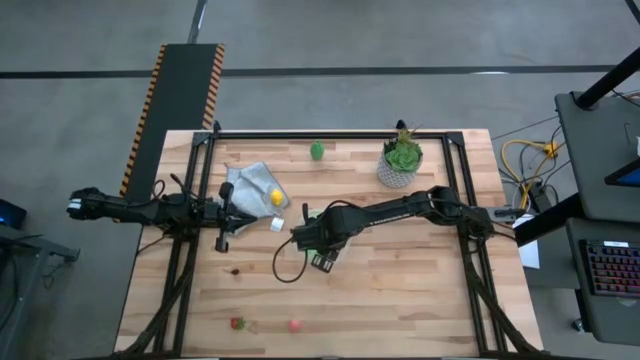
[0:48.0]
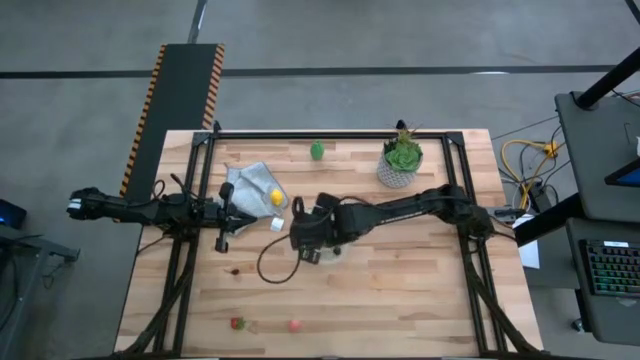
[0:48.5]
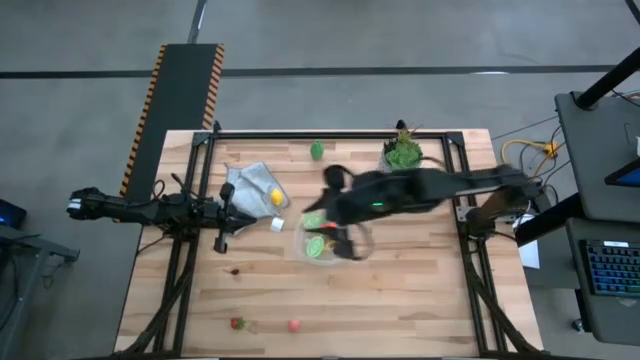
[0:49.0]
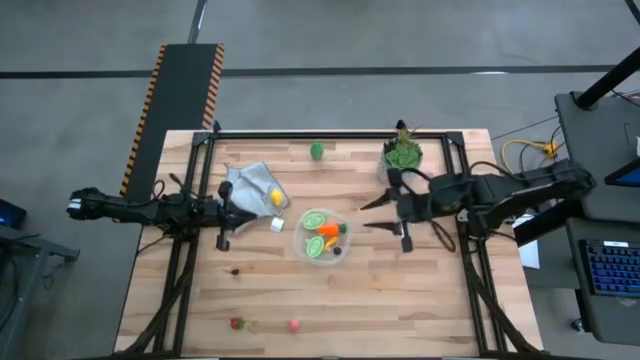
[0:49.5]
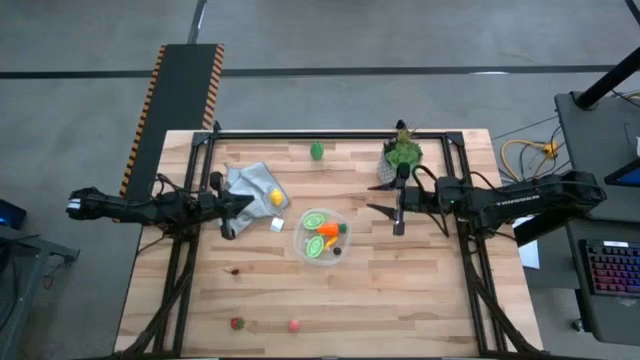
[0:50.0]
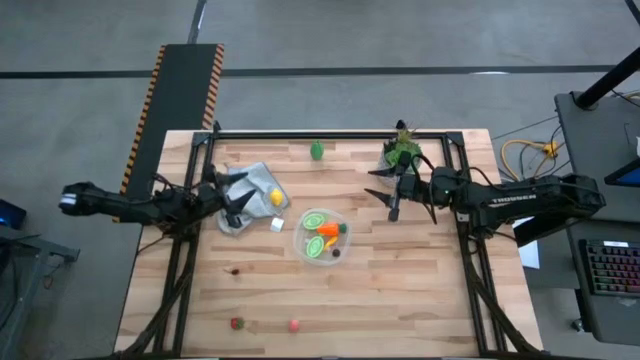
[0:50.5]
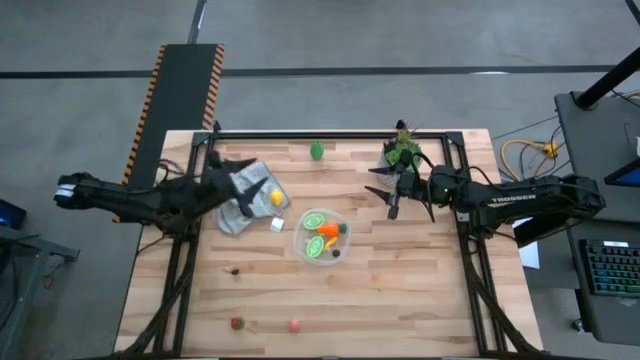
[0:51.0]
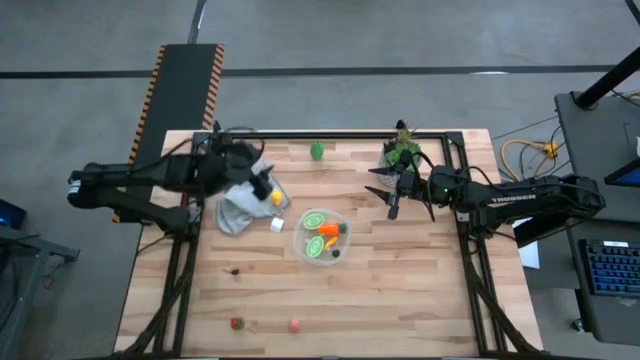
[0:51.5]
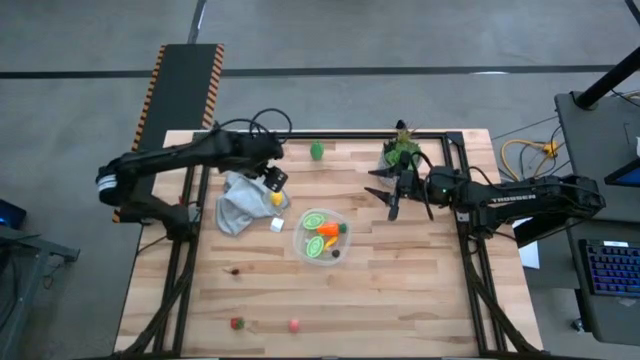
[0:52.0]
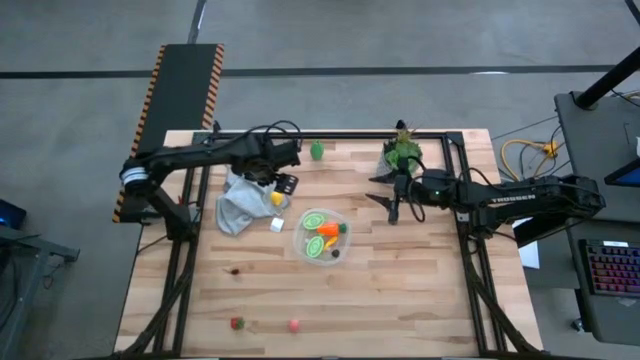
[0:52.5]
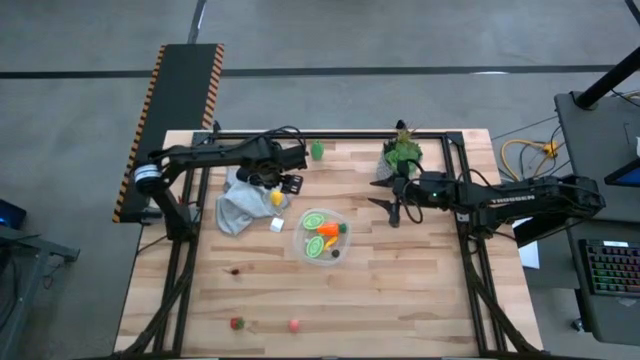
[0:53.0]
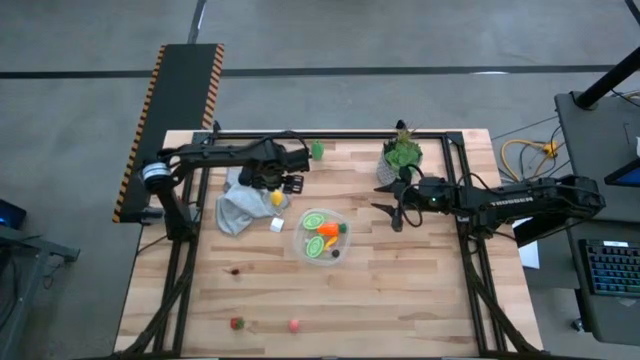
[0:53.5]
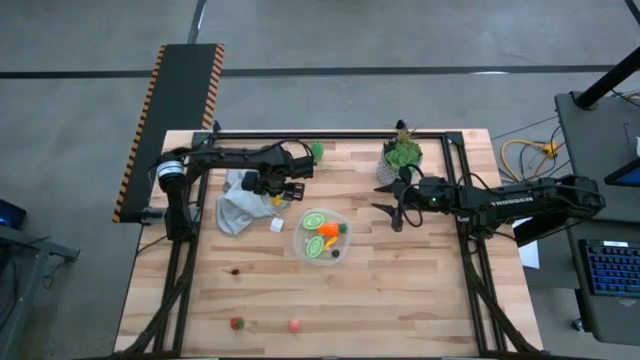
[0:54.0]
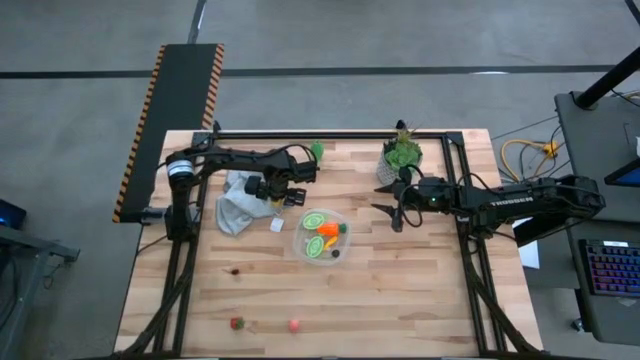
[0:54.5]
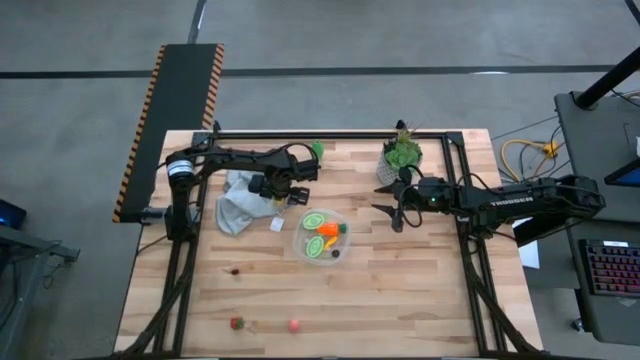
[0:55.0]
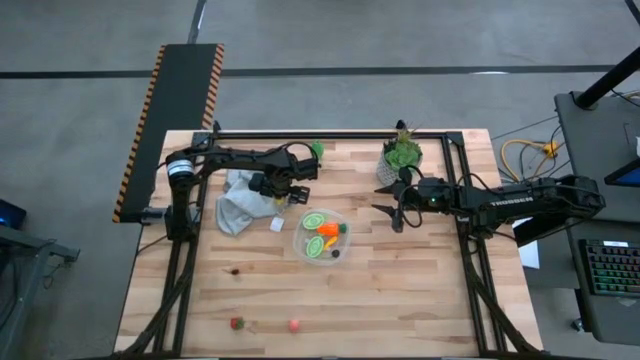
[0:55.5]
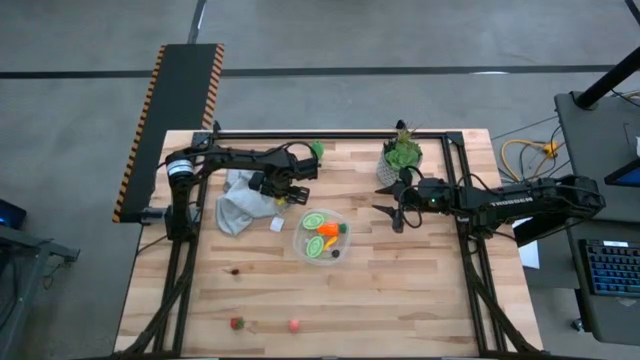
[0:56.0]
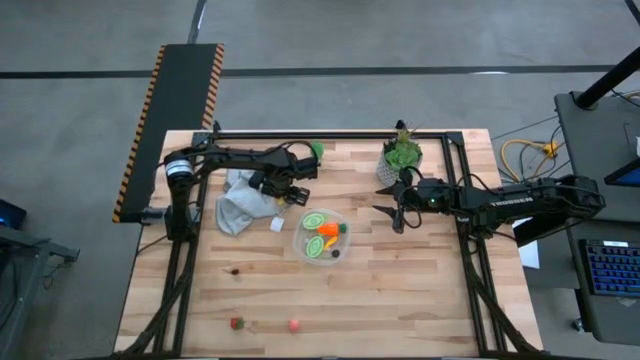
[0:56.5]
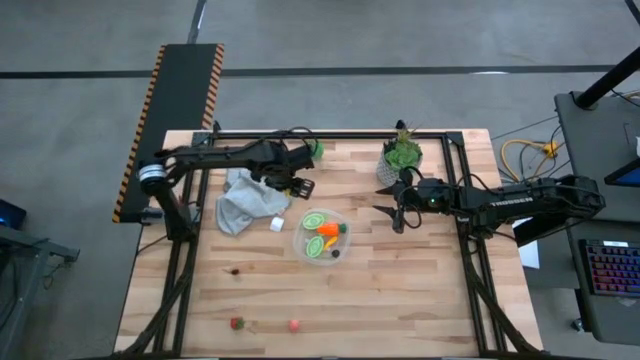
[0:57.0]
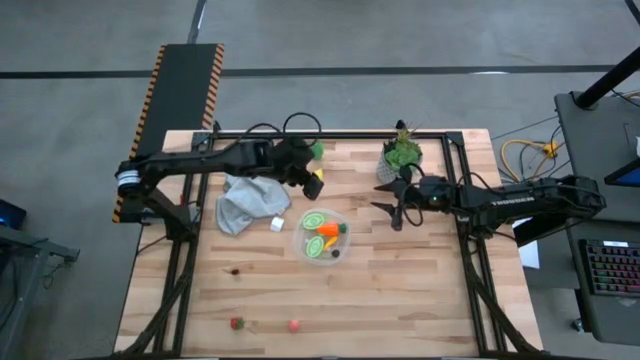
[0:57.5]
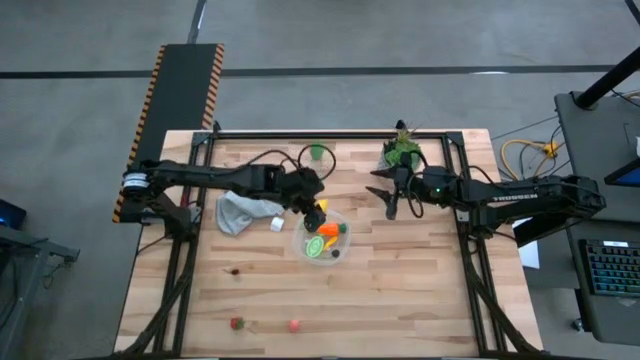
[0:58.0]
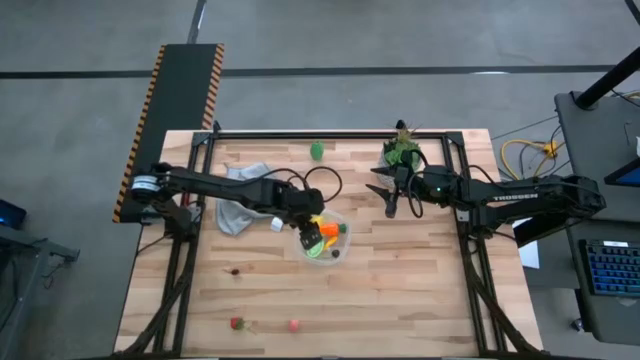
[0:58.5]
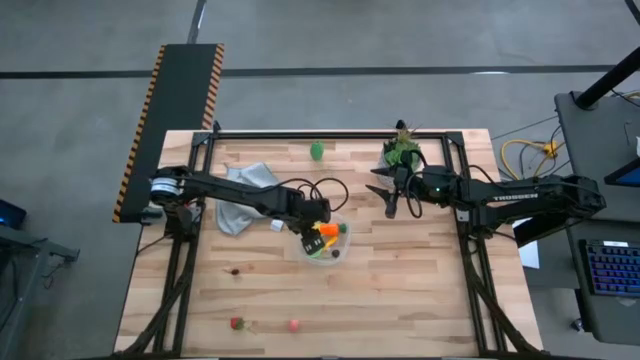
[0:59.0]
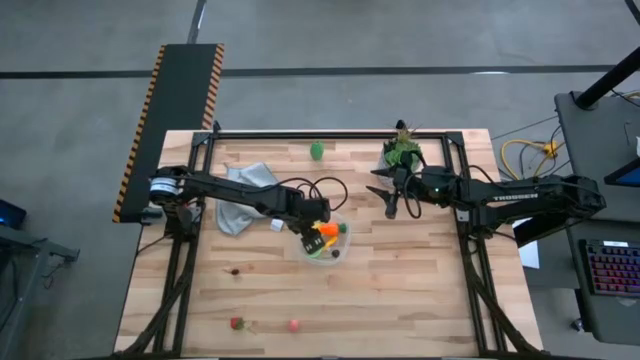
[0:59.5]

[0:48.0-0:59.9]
Task: Pick and placing Produce into tupperware
Put the yellow lemon into the transparent bin

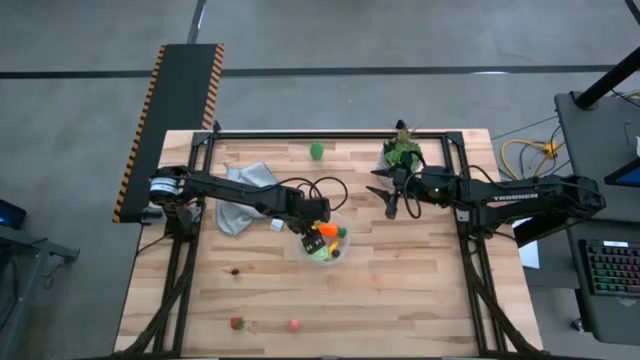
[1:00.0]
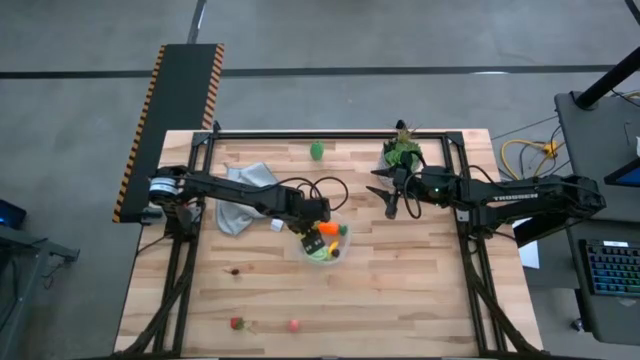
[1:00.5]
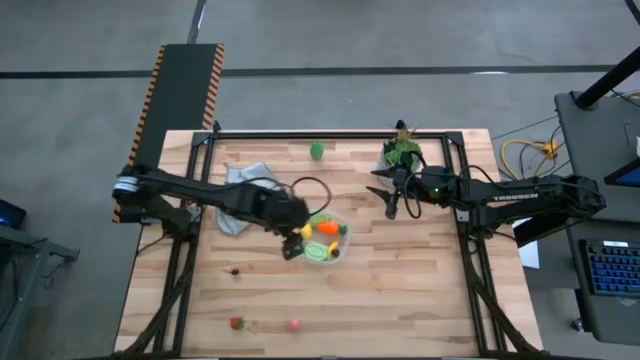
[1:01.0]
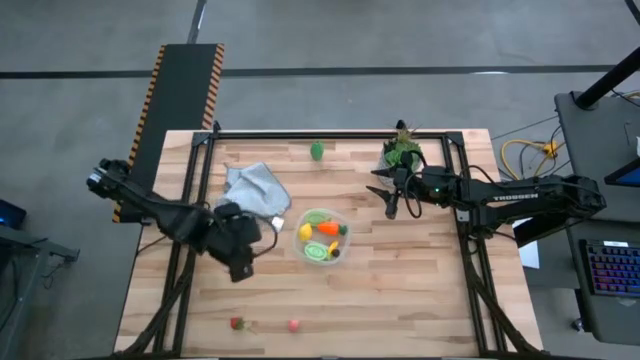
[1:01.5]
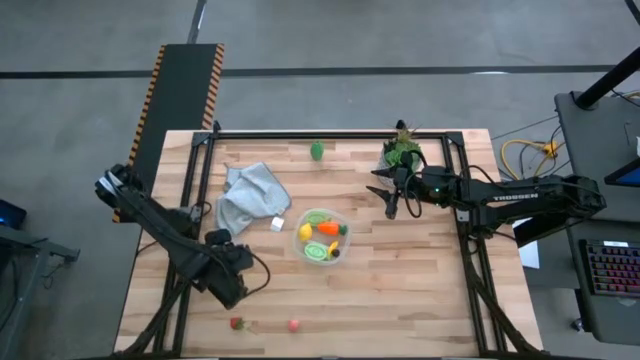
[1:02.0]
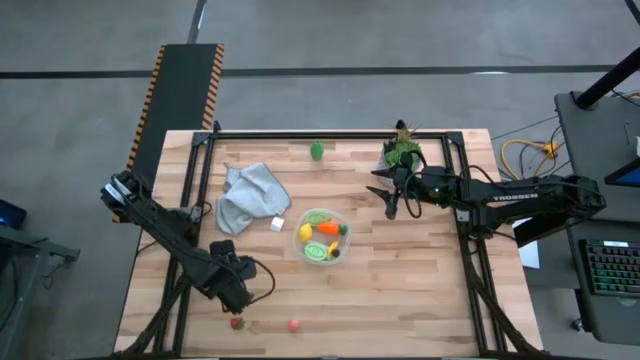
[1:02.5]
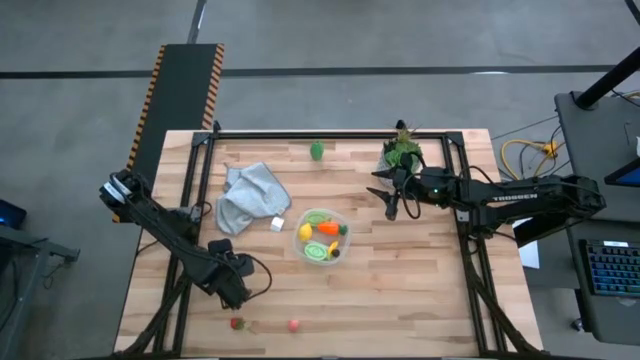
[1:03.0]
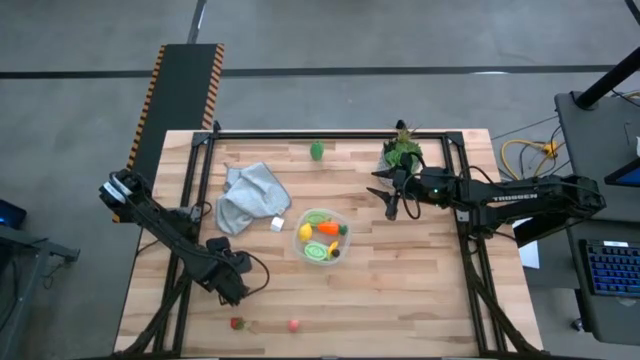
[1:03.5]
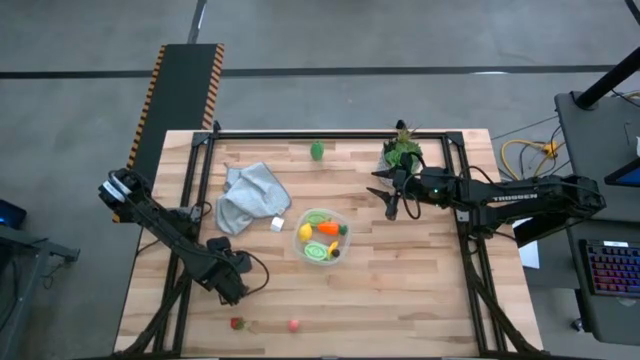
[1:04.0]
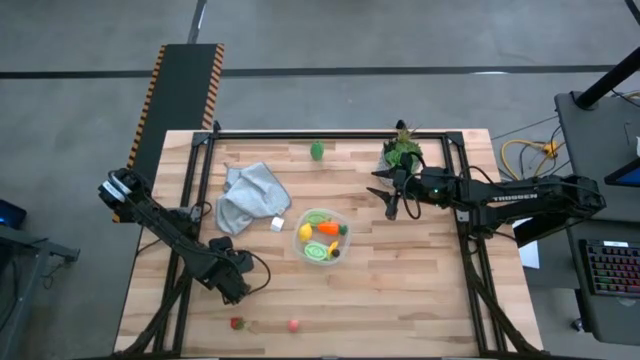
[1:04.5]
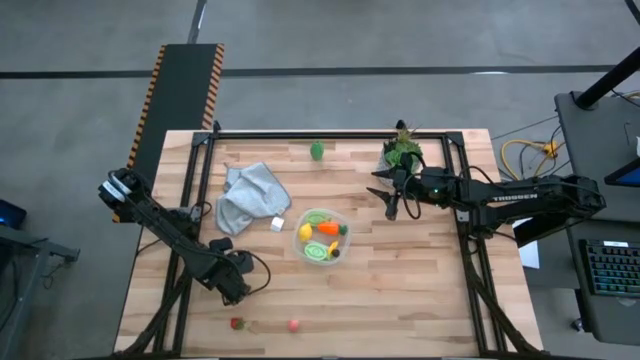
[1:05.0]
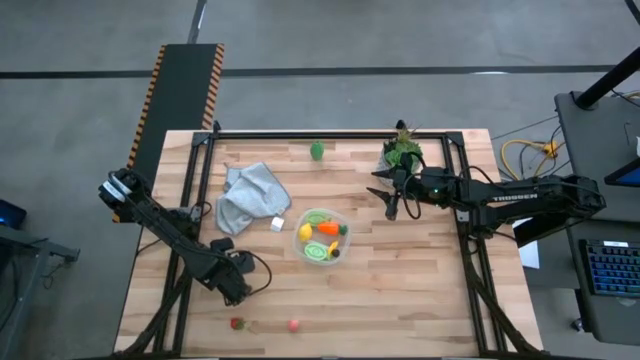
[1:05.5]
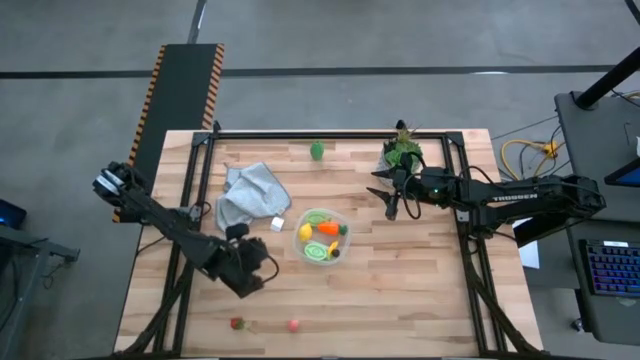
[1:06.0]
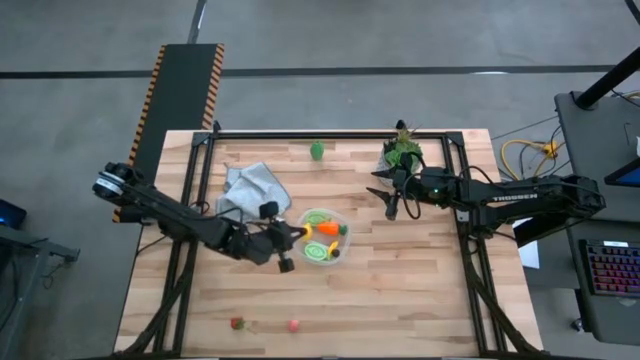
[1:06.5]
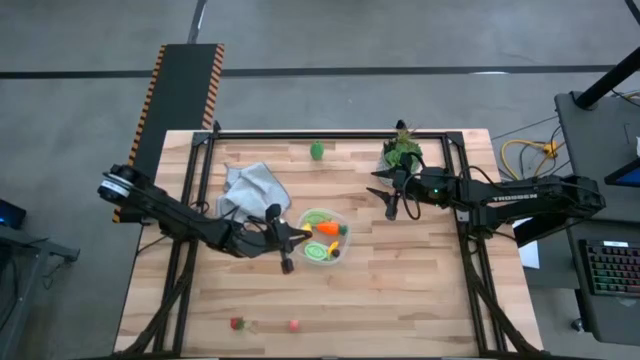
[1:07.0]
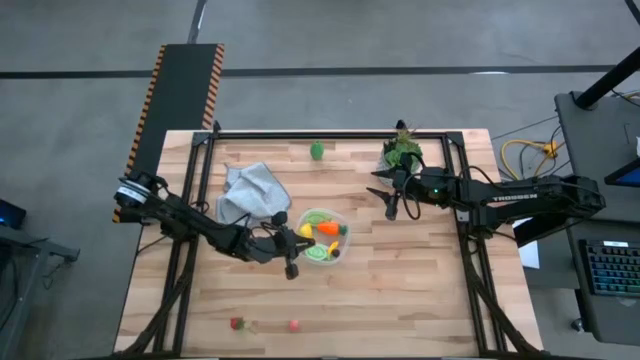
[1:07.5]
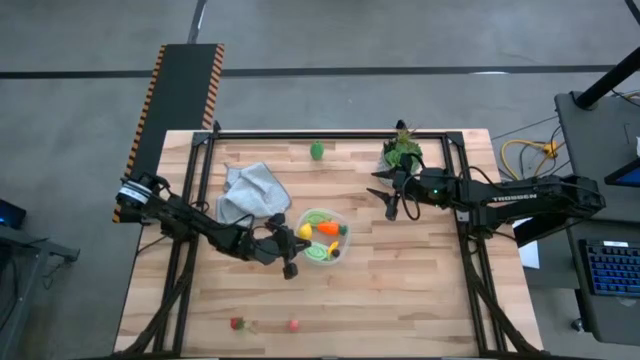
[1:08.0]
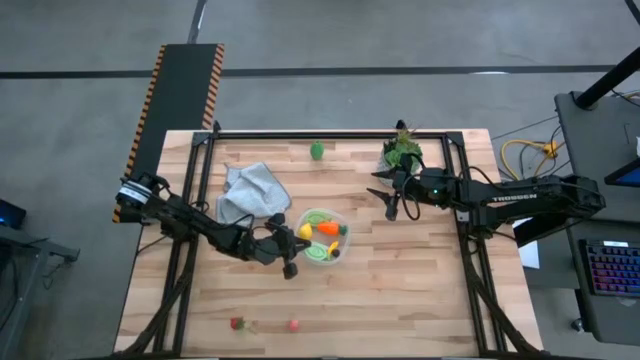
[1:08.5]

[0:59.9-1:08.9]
Put the red cherry into the transparent bin
